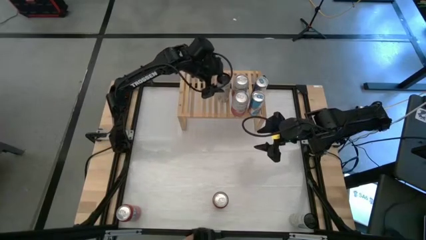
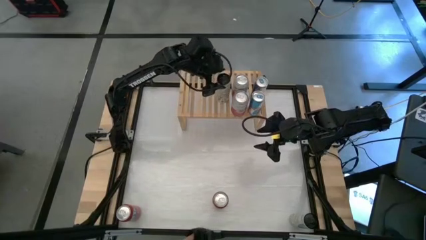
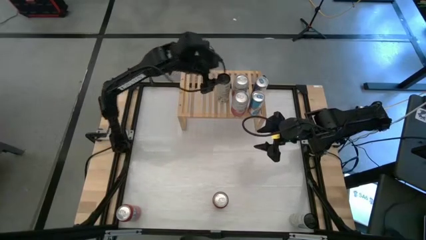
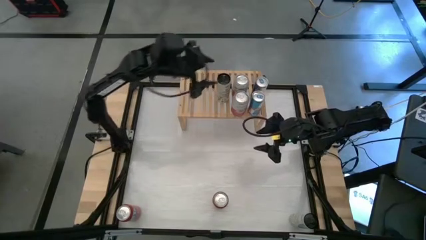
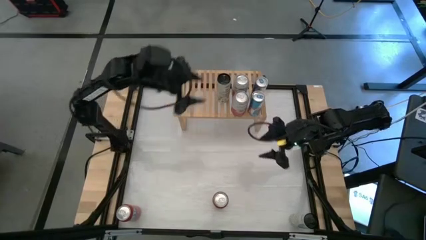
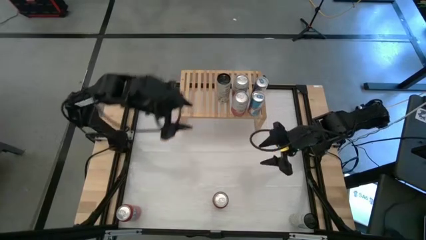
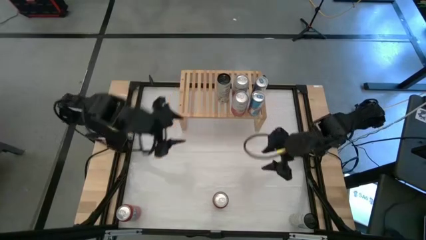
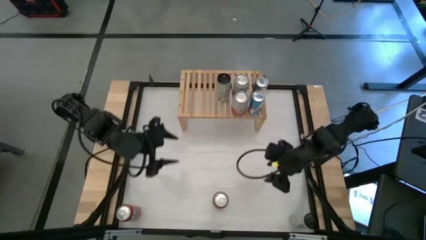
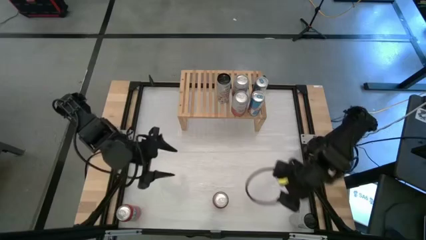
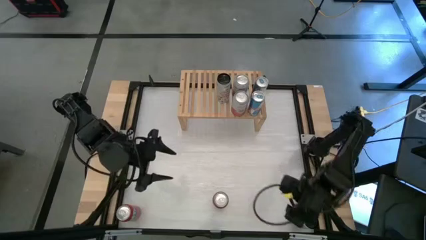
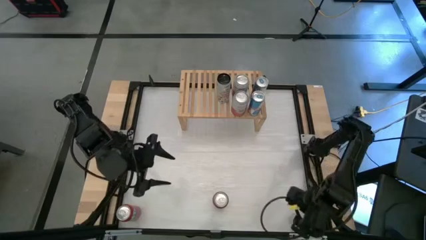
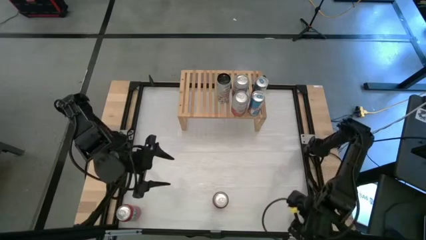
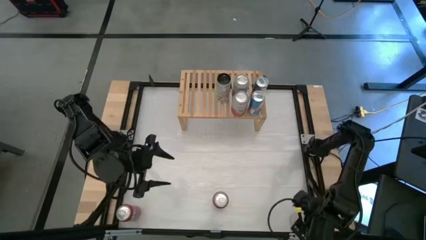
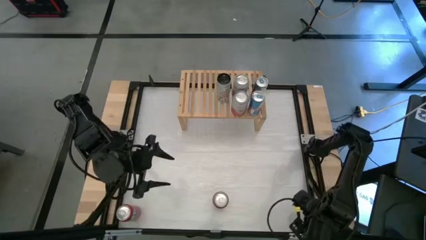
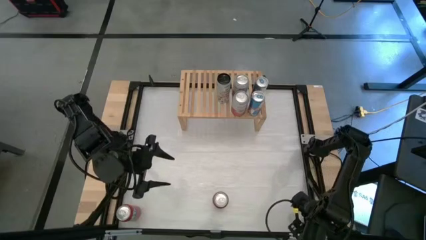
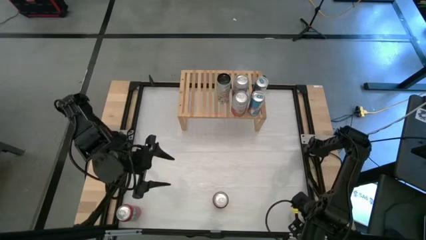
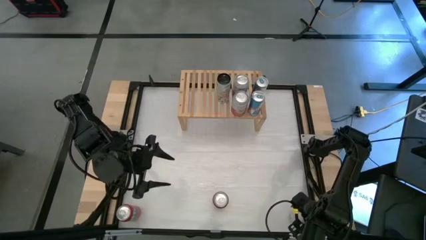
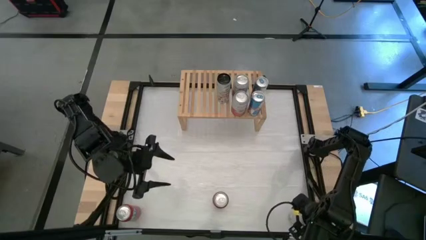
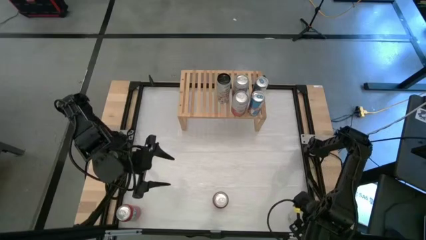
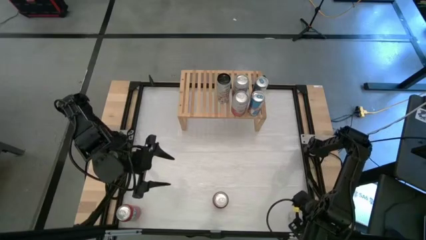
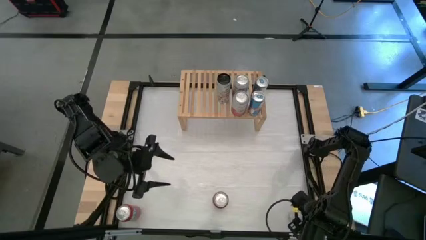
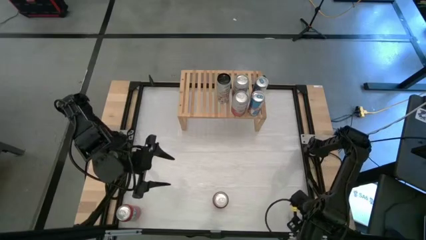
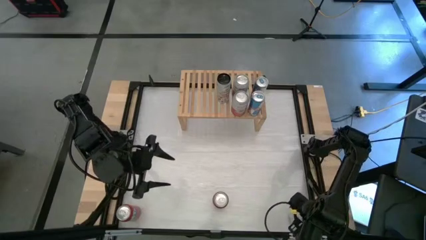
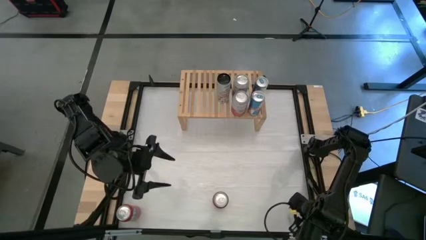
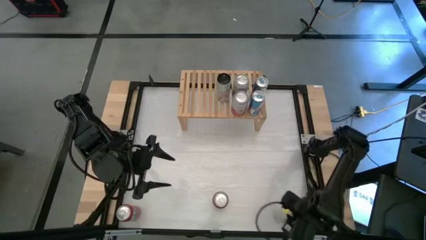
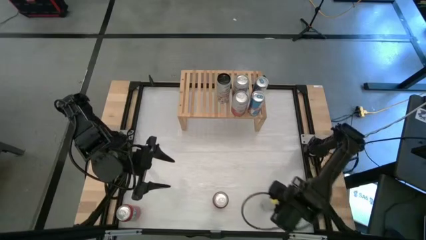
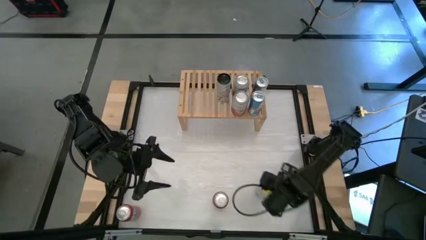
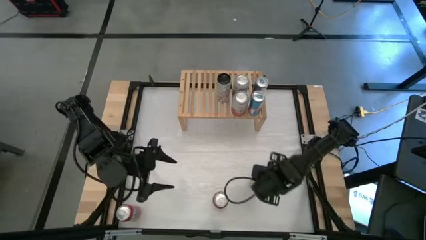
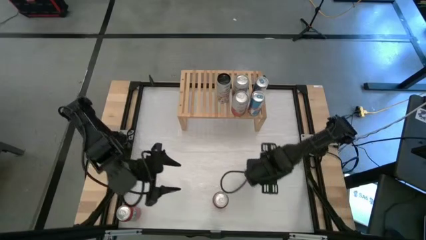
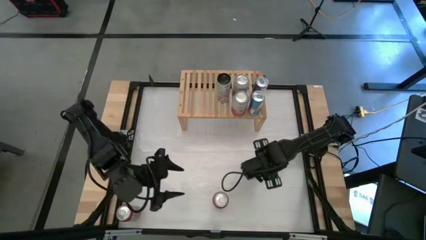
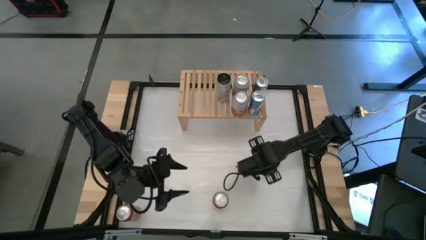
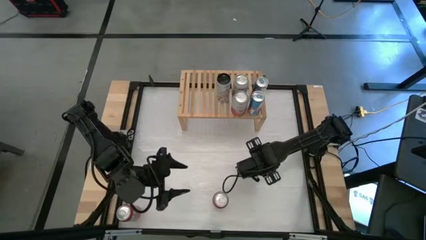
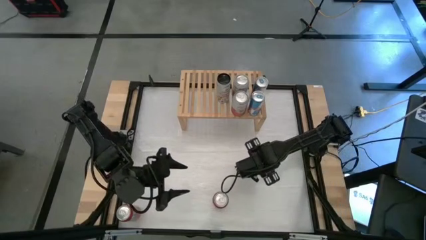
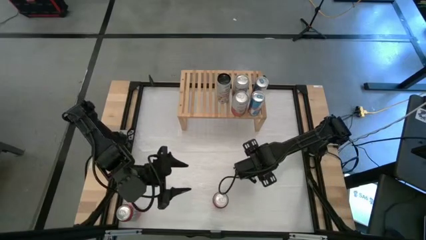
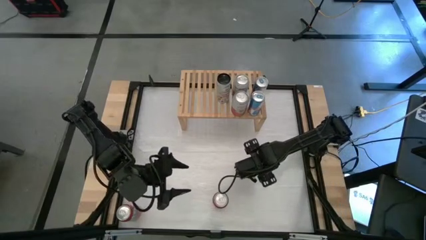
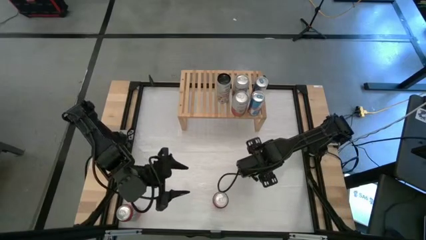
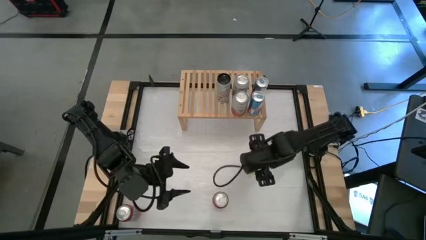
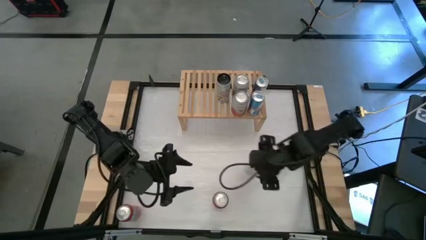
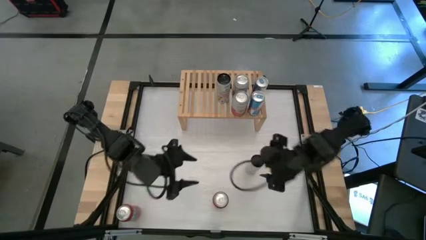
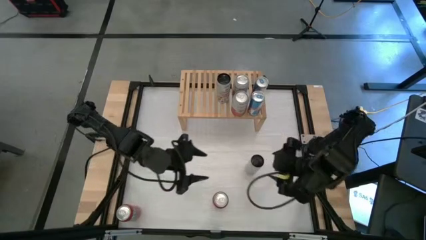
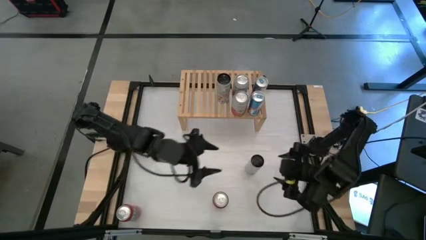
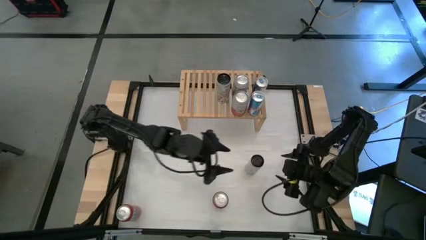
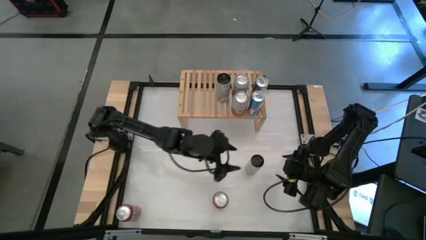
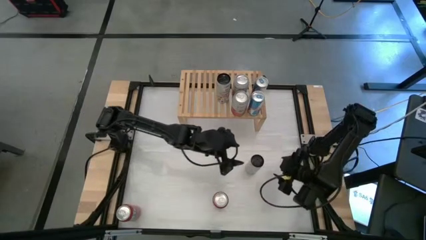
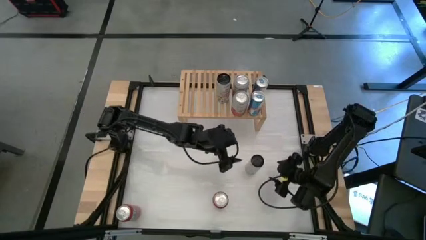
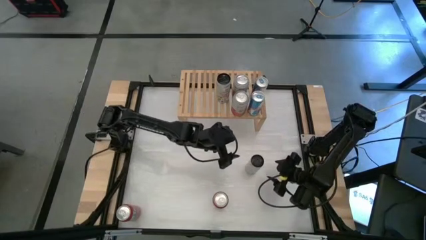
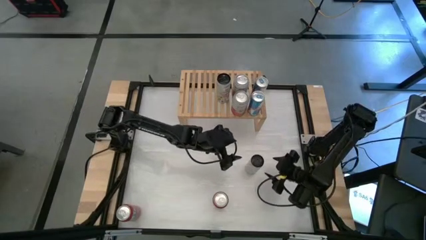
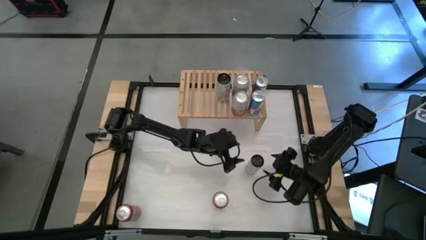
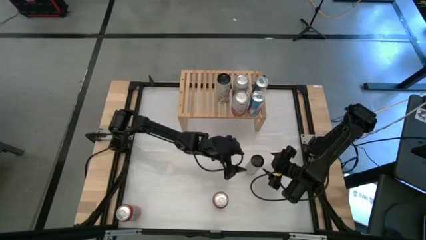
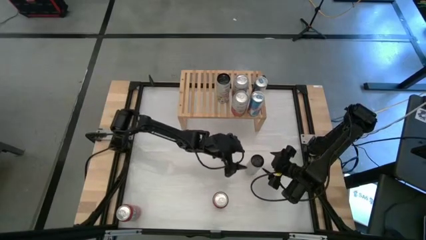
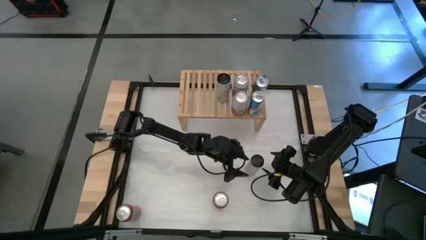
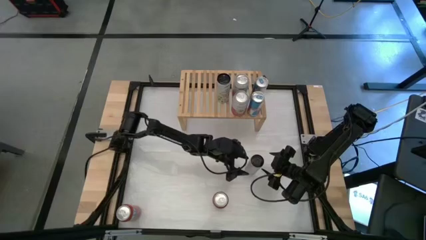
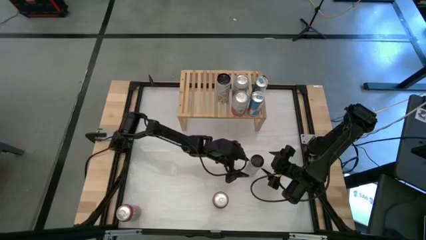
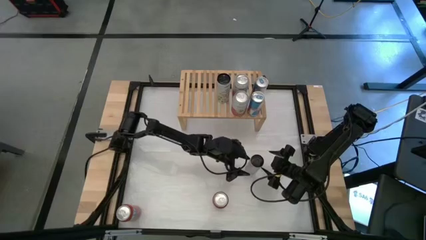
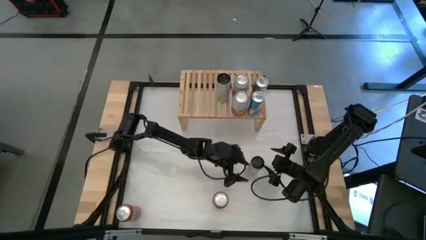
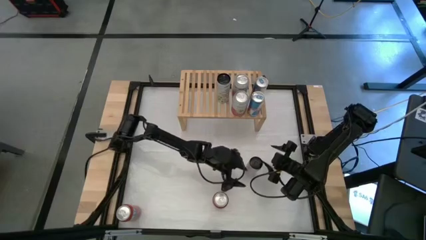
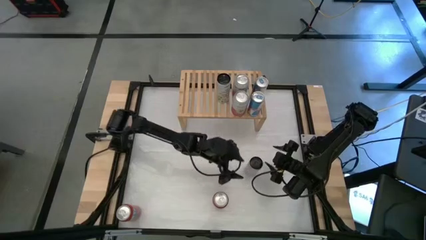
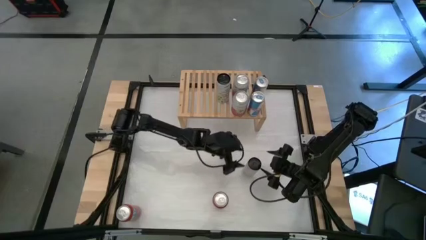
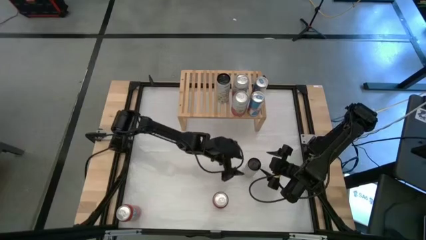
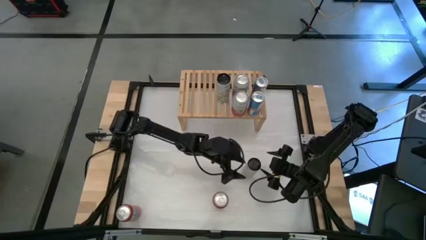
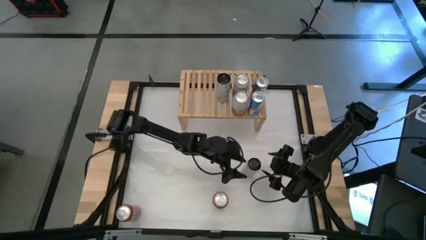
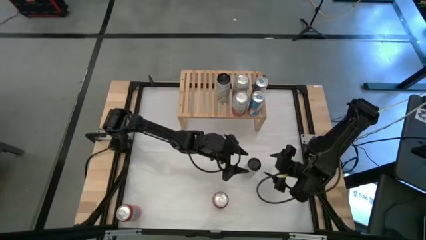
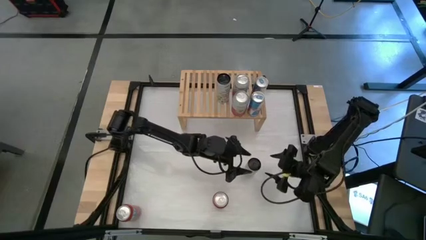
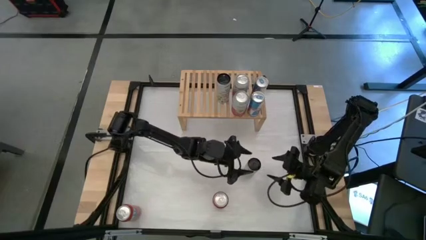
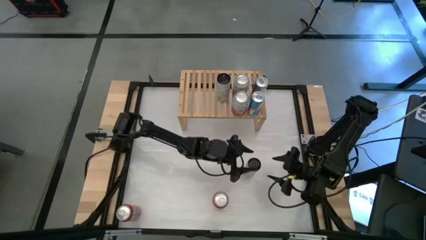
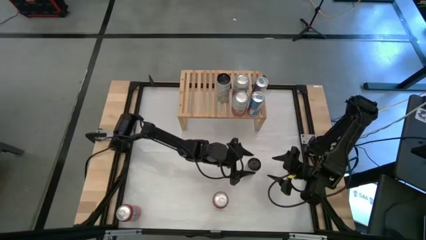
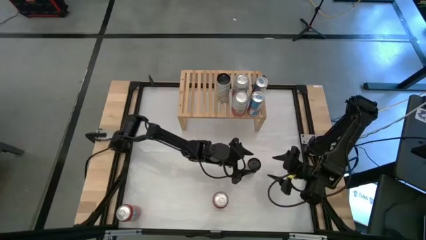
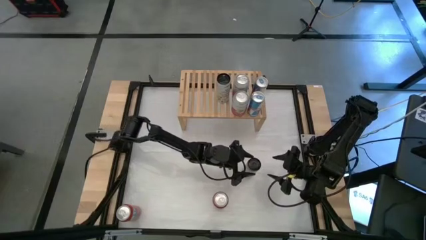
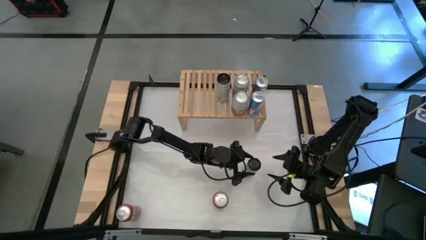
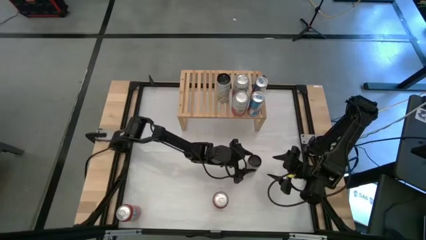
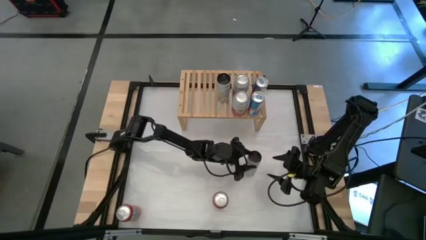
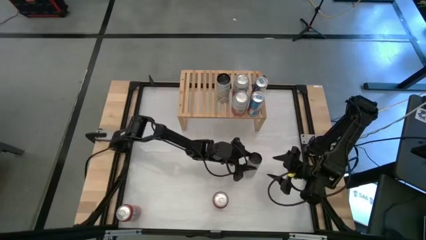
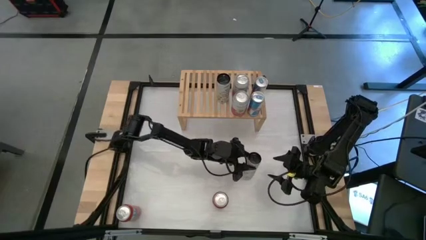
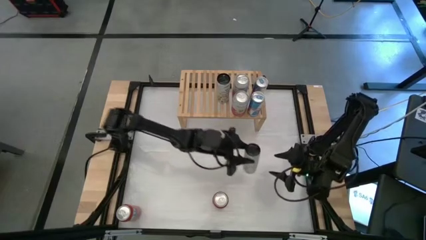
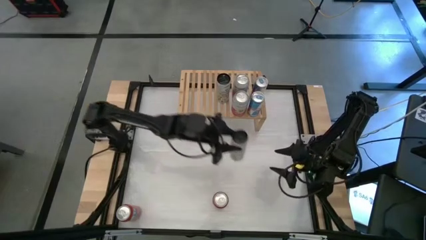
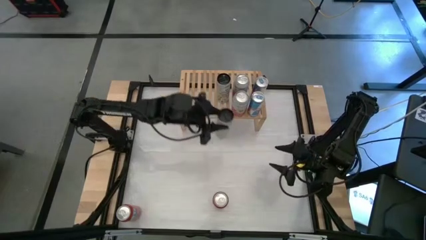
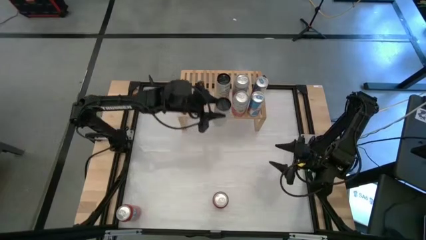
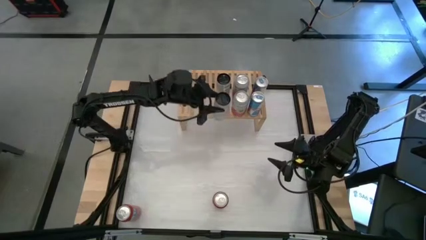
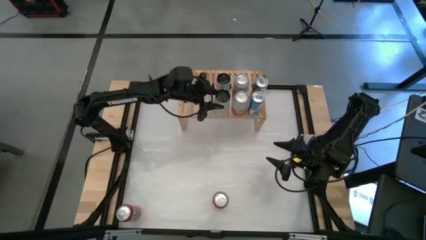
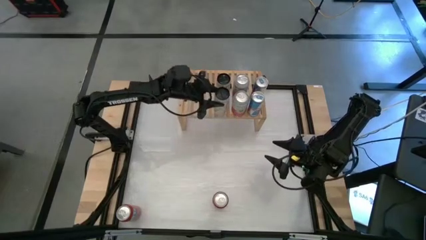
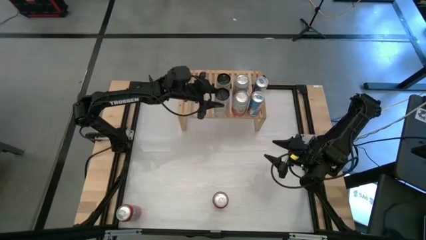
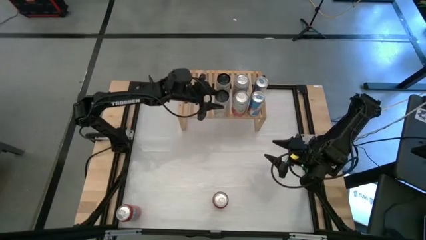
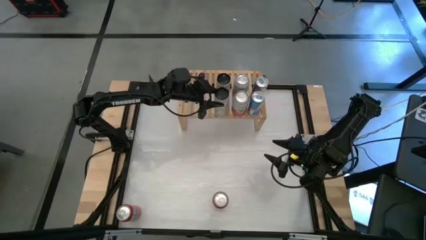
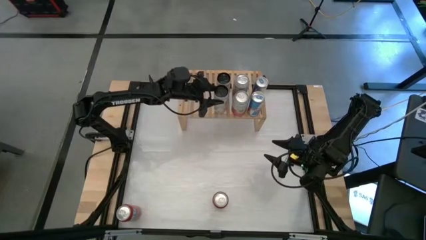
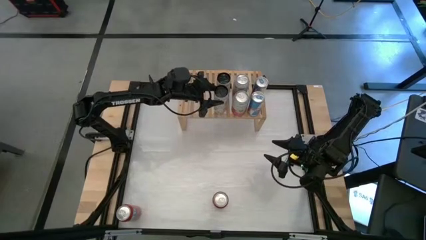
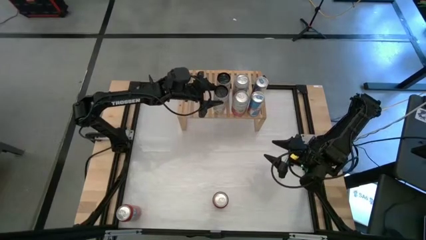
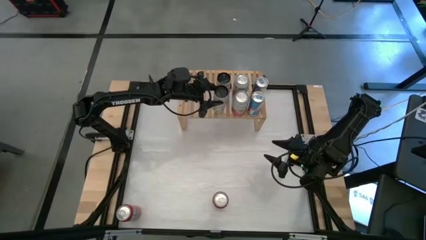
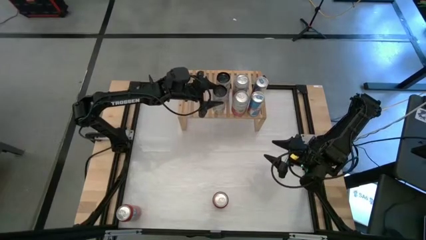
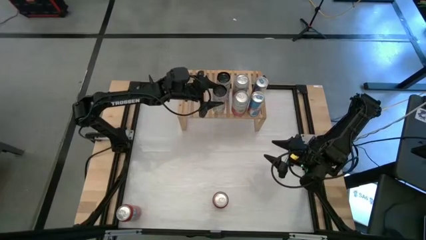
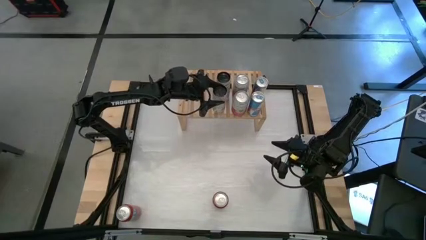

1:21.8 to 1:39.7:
Task: Place canned beverage on shelf
Put the white yellow soda can on the shelf aligned with the other white yellow soda can
